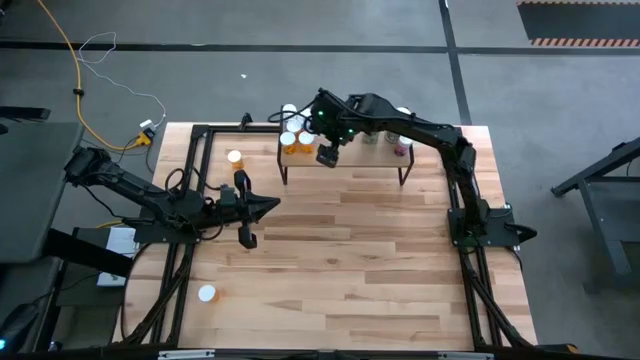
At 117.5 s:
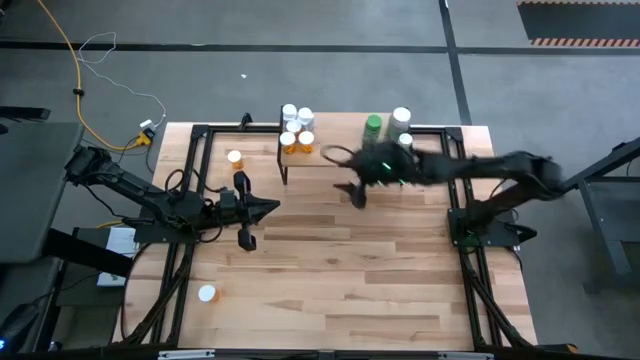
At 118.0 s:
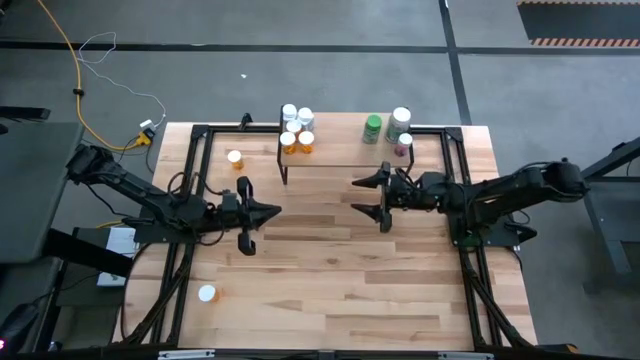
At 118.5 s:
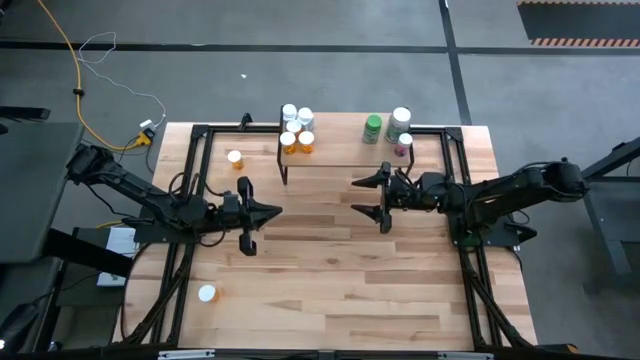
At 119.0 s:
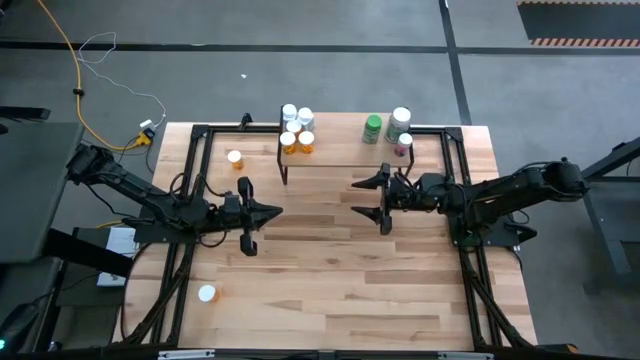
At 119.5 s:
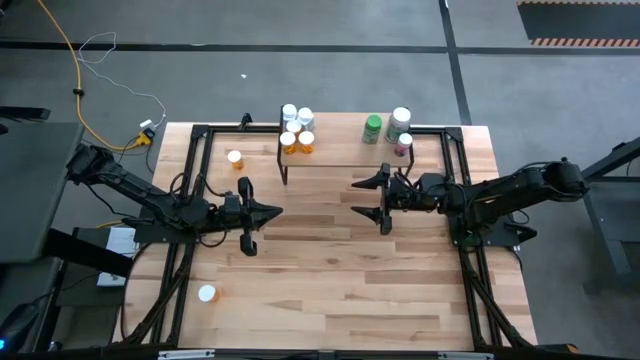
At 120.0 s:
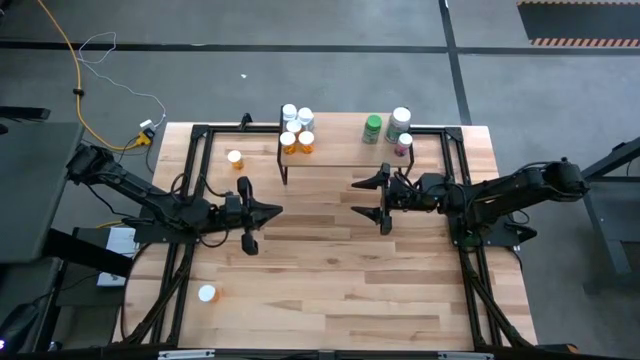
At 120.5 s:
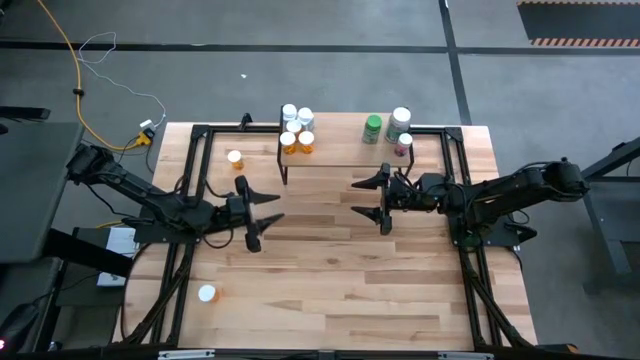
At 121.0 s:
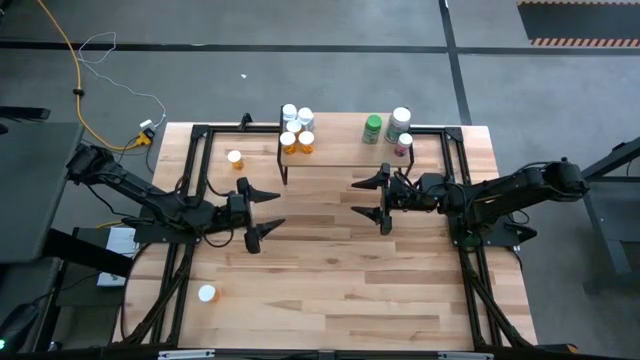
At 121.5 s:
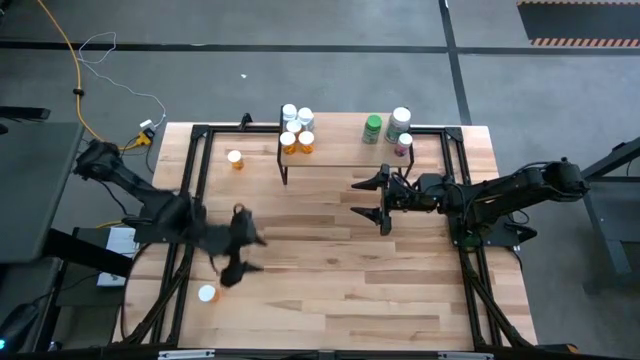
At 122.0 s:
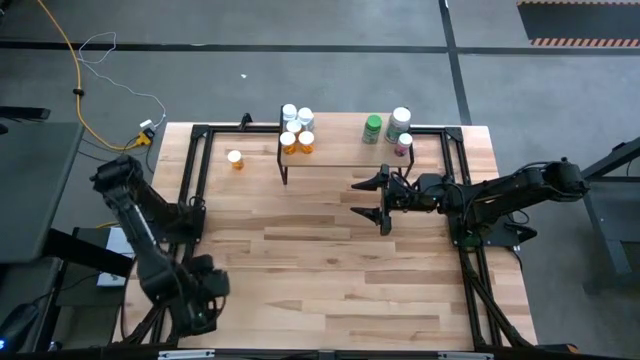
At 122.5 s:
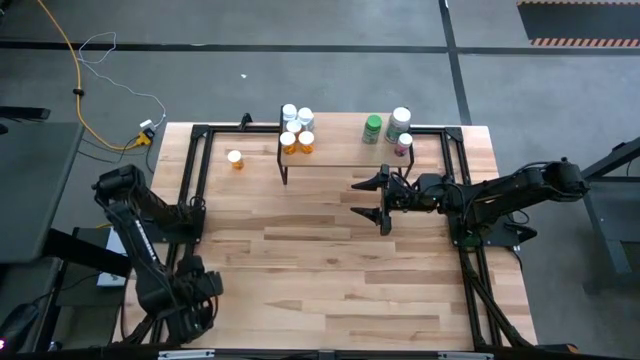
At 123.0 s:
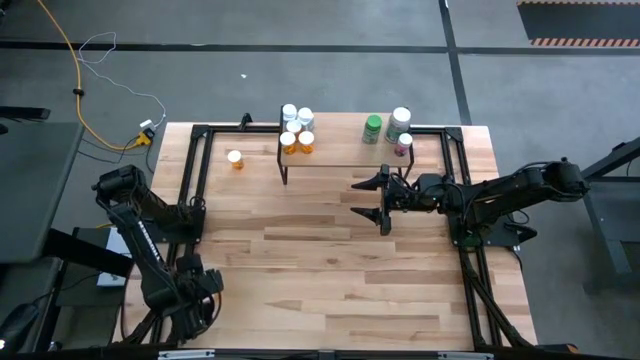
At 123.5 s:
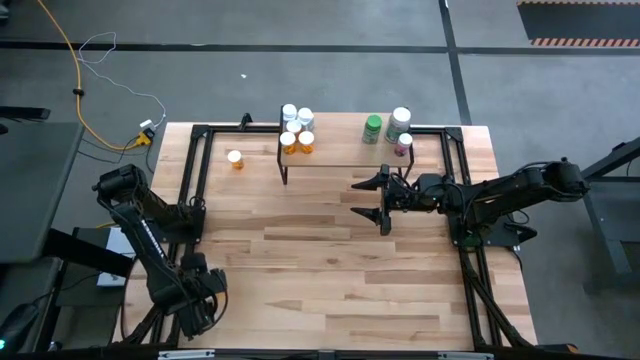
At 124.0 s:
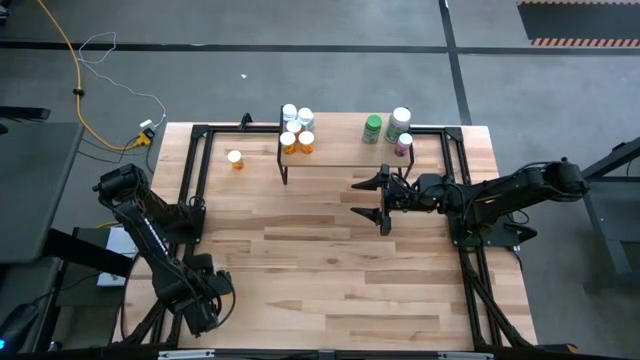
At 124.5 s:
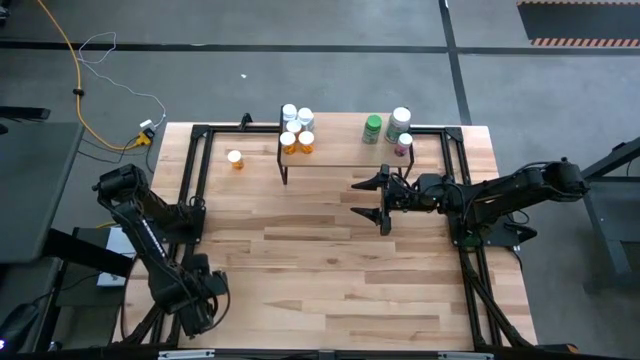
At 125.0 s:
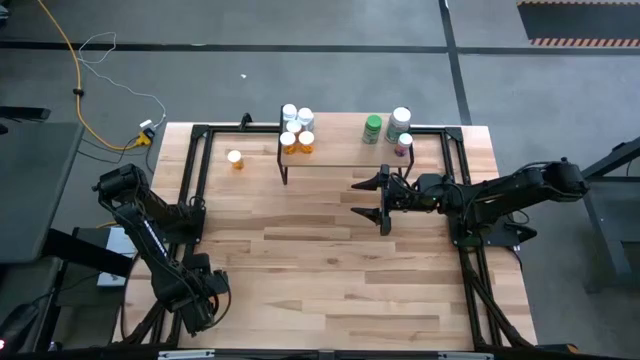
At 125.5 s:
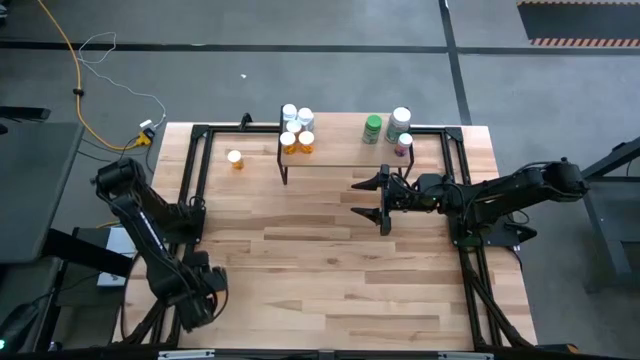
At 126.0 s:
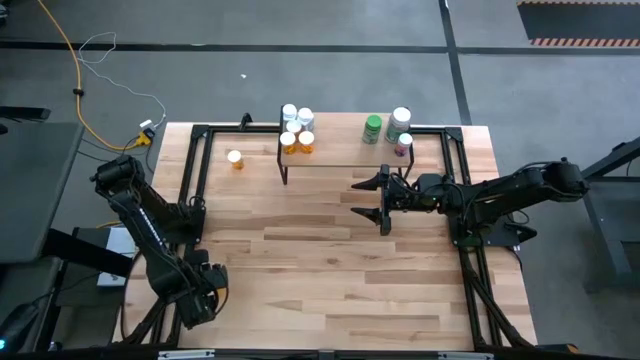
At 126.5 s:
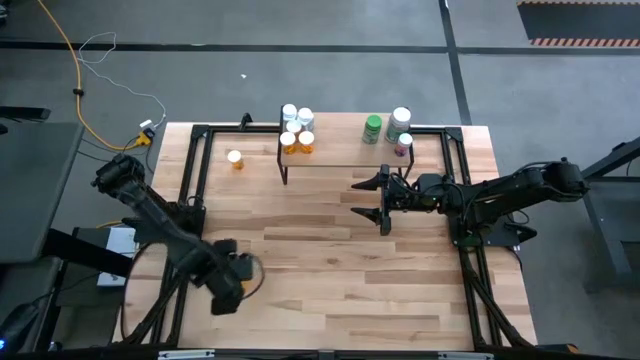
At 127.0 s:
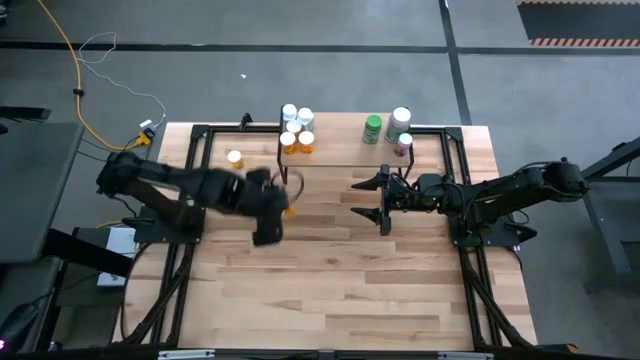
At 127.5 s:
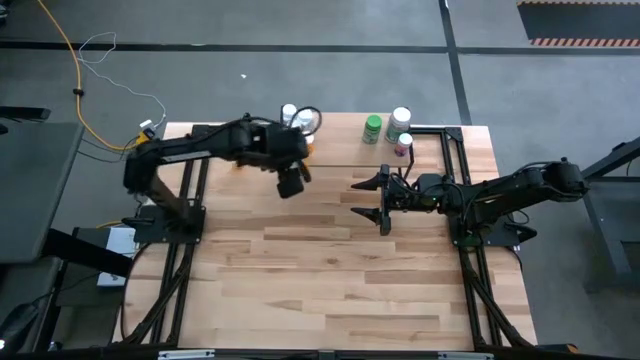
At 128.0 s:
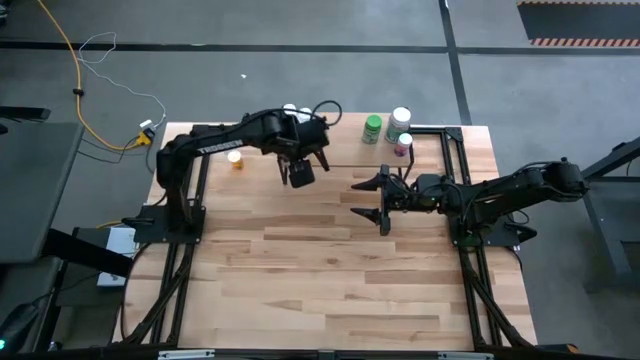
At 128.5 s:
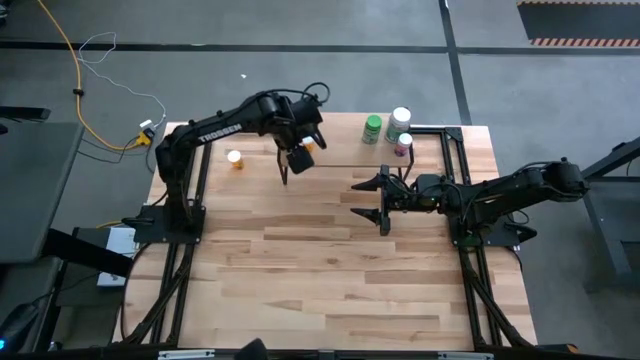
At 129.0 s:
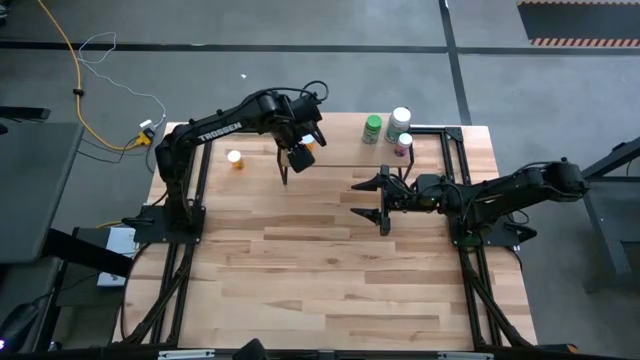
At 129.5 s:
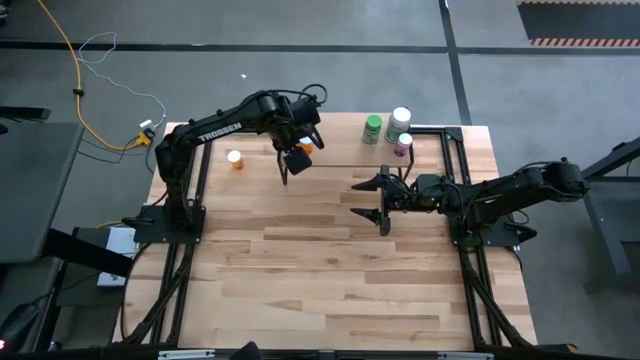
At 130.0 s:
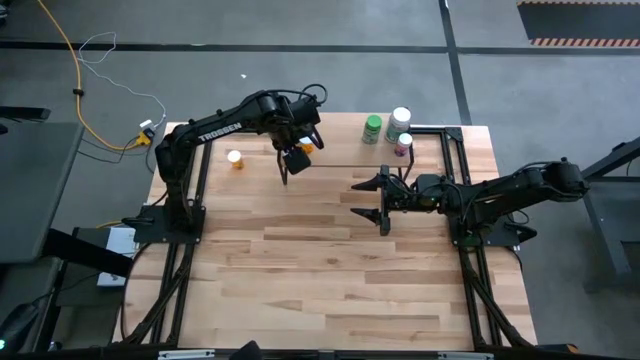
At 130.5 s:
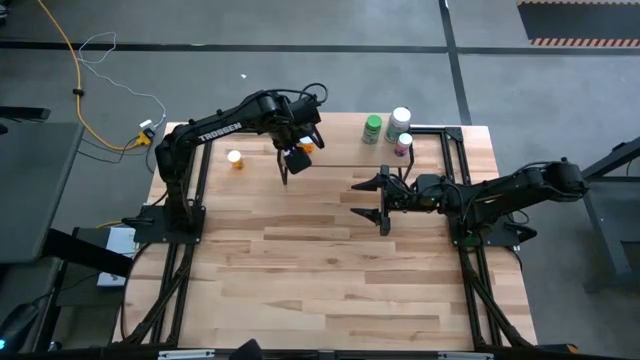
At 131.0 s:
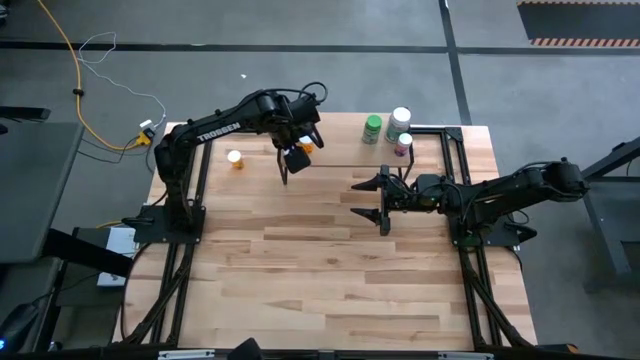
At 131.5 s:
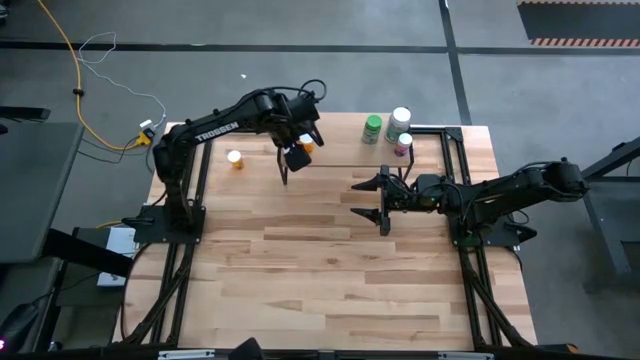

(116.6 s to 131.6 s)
Task: Pick and place medicine bottles onto shelf by color
Put the orange pill bottle on the shelf

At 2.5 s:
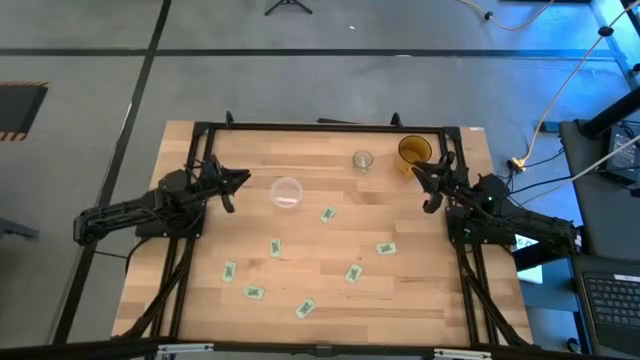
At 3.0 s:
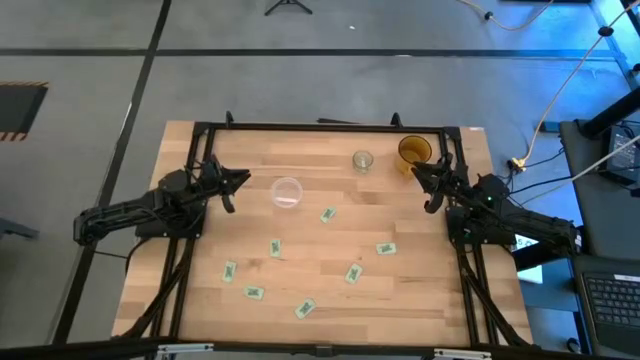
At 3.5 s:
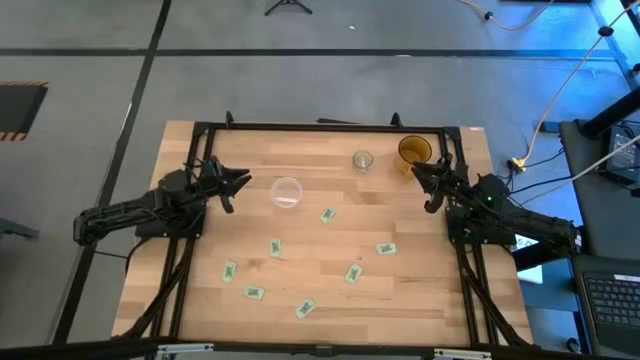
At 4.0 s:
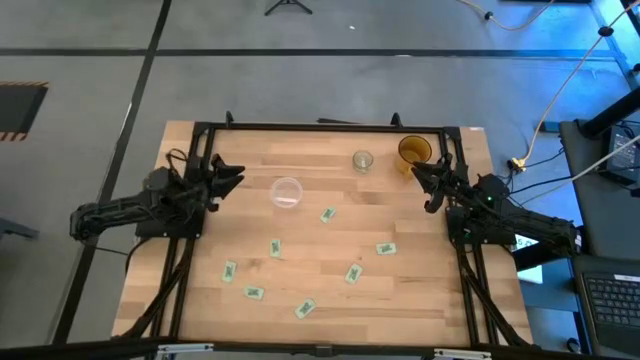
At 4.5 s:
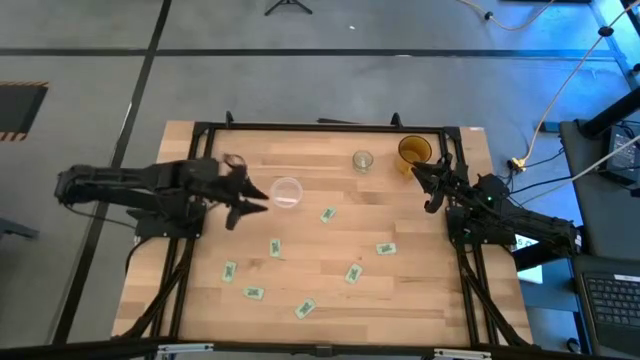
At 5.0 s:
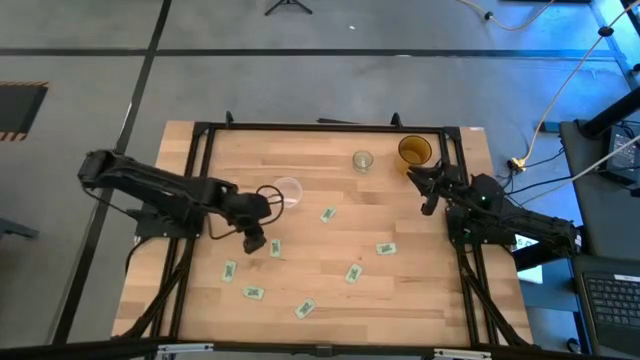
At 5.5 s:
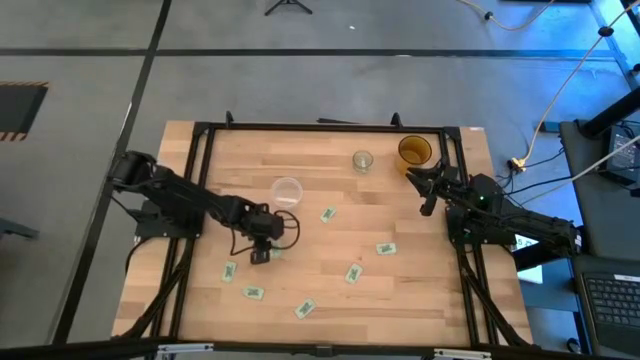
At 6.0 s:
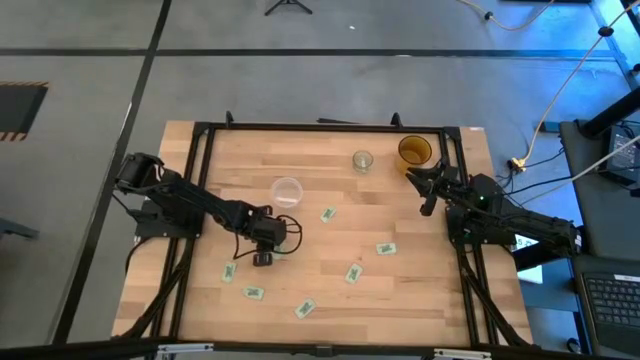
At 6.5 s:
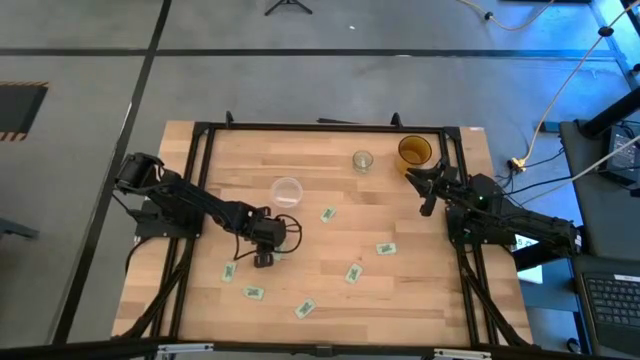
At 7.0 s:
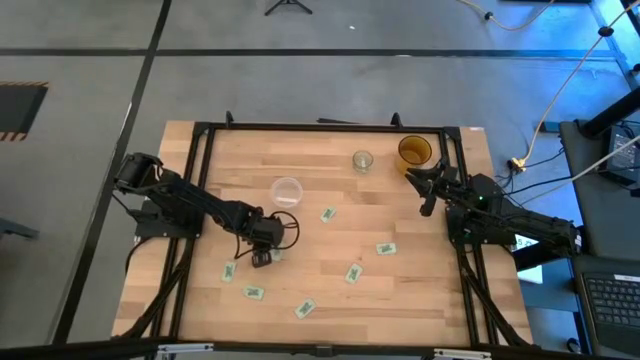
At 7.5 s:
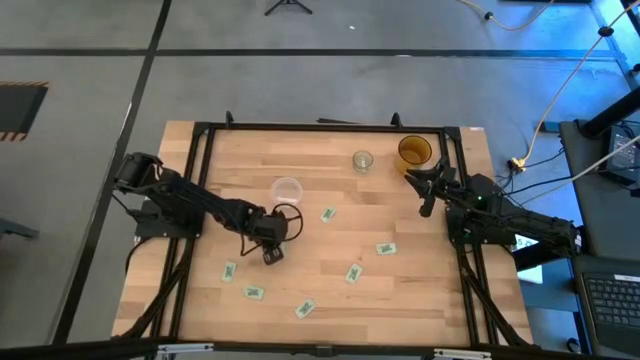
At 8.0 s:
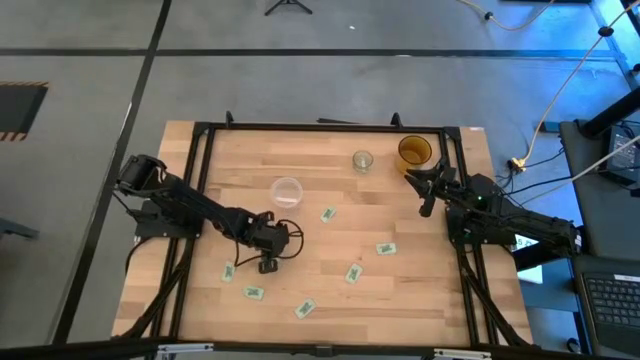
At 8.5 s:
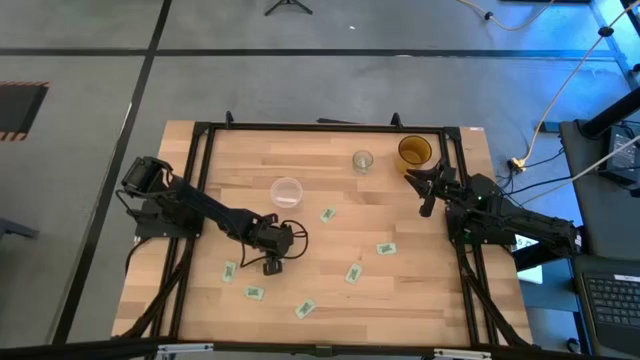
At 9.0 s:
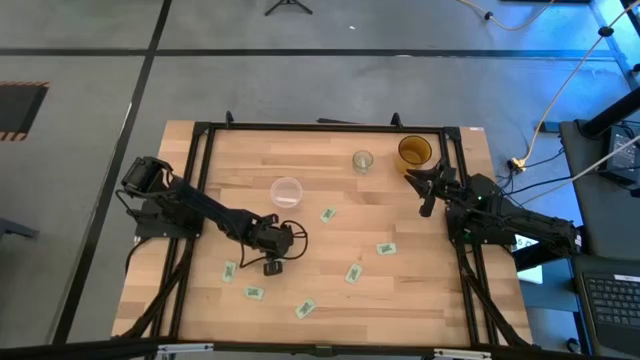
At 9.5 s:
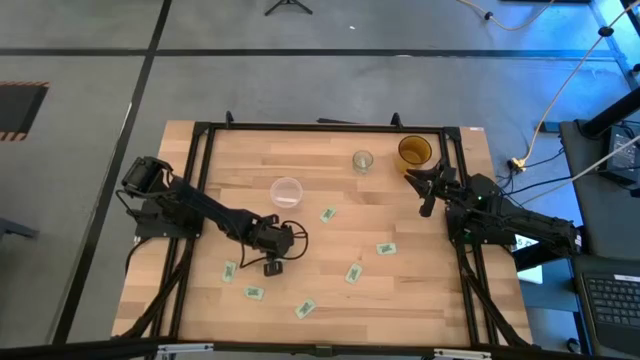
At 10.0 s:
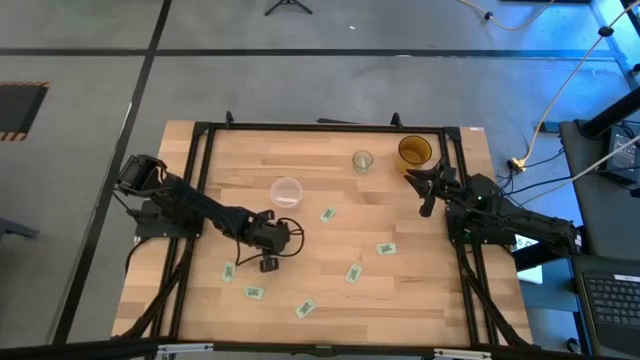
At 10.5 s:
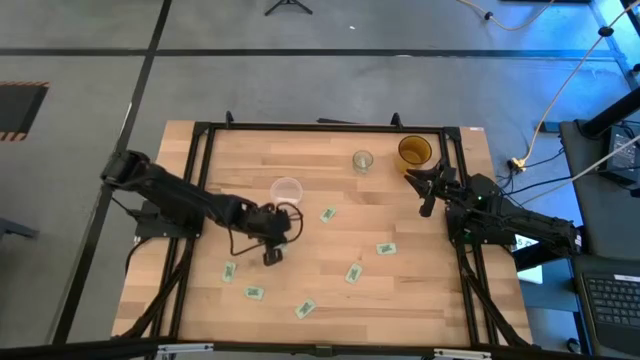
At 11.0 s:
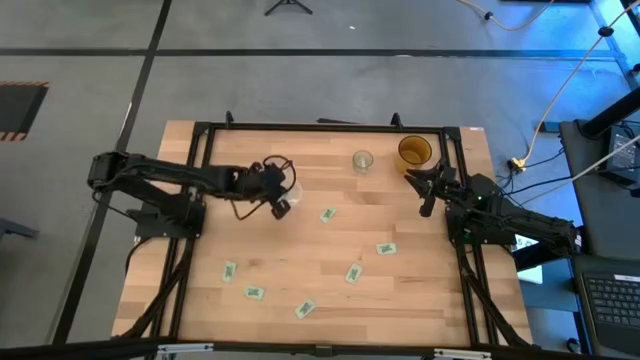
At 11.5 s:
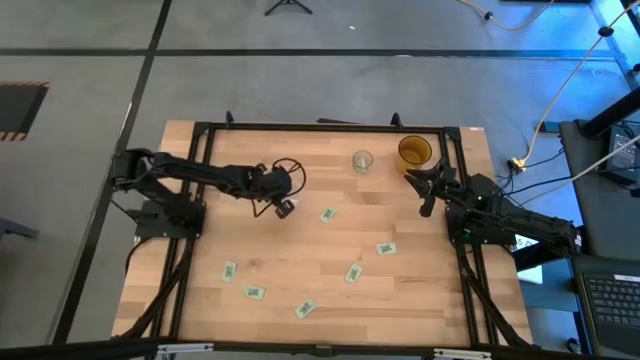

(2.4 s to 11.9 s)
Task: Pick and place Stevia / Truvia into bins
Put the stevia packet into the transparent container
